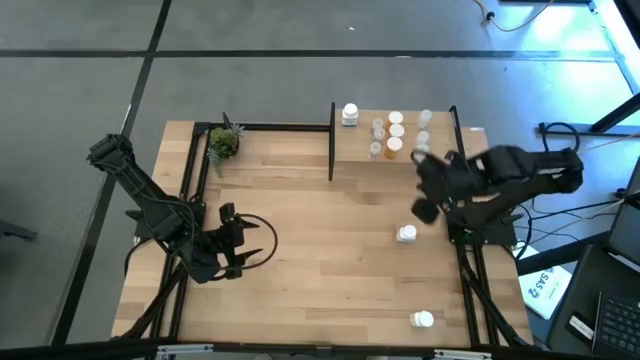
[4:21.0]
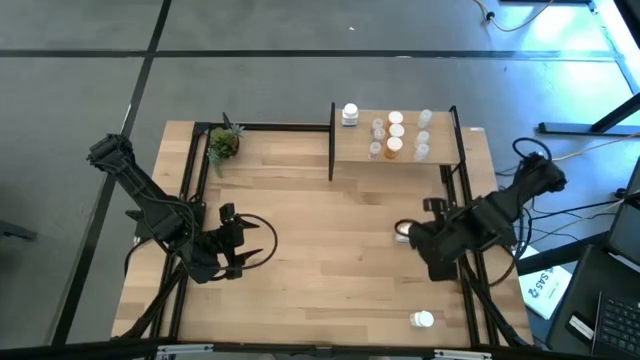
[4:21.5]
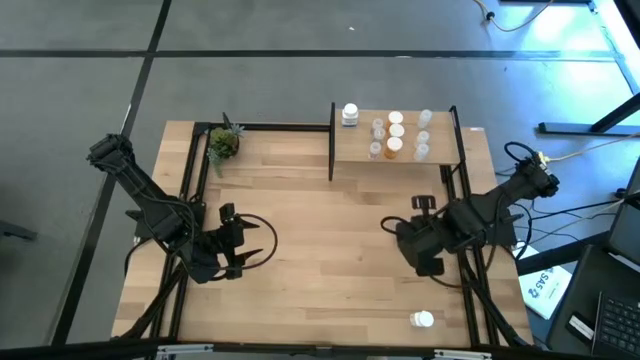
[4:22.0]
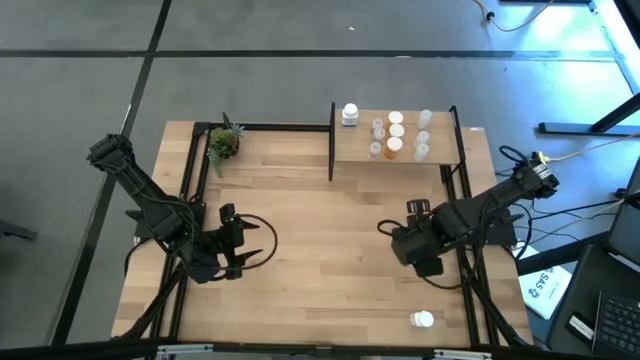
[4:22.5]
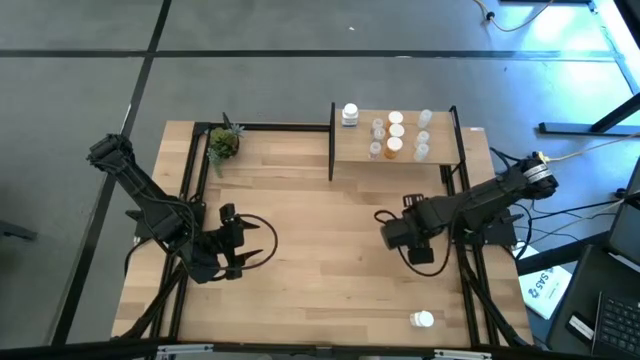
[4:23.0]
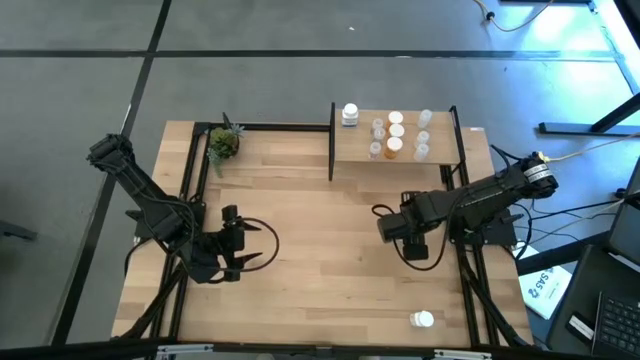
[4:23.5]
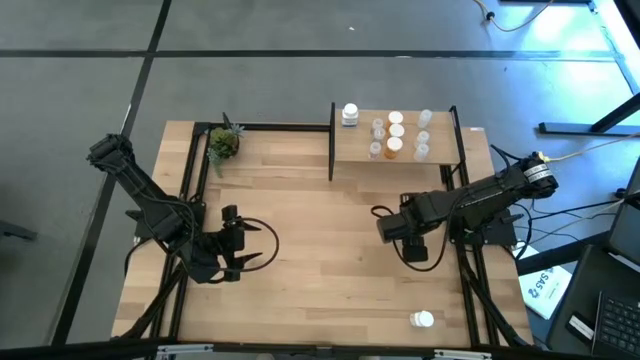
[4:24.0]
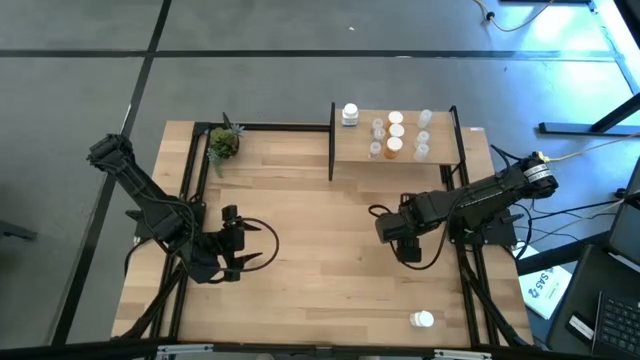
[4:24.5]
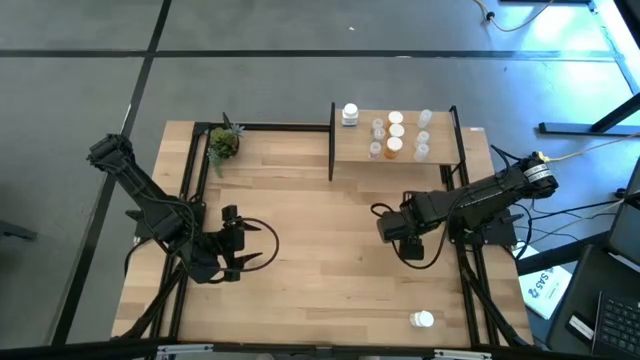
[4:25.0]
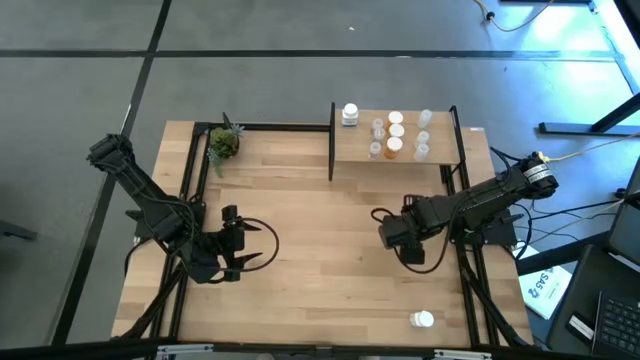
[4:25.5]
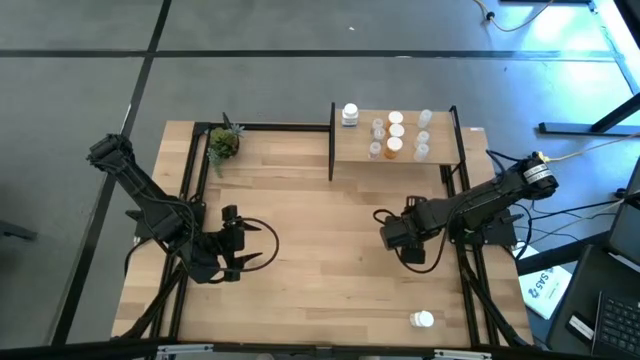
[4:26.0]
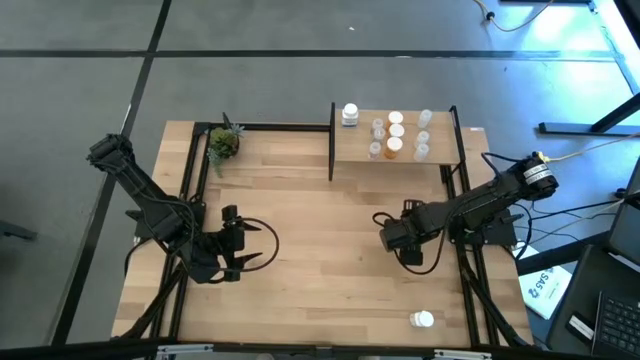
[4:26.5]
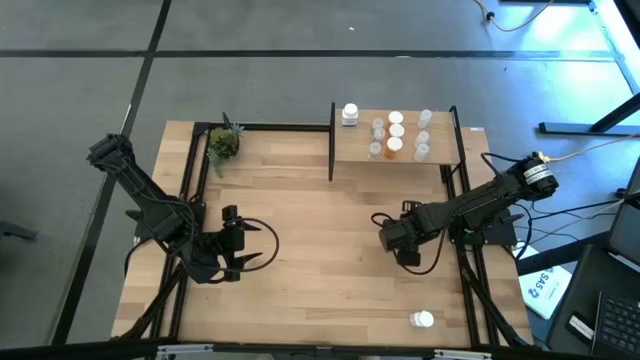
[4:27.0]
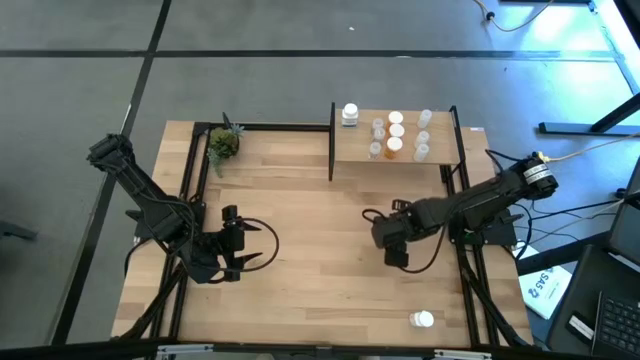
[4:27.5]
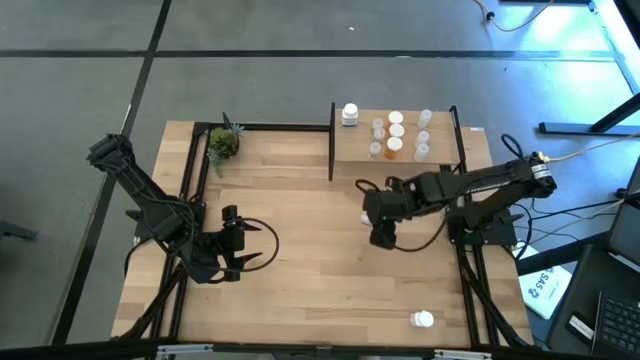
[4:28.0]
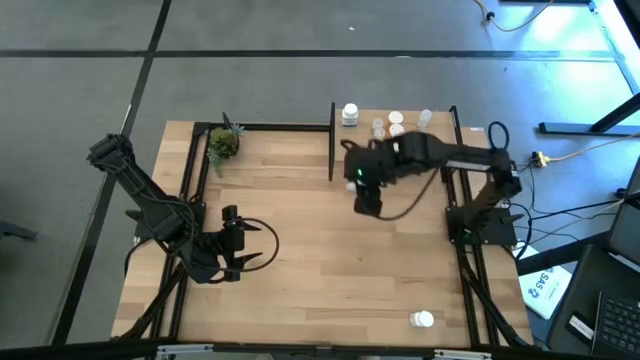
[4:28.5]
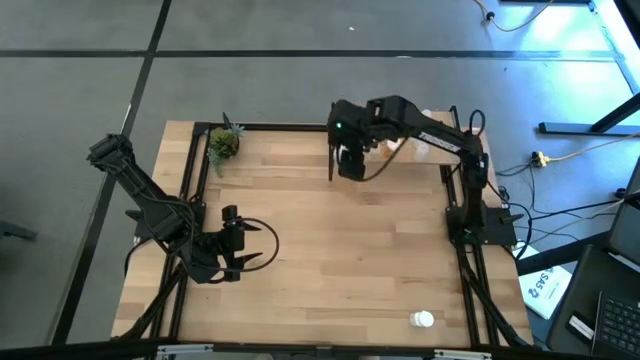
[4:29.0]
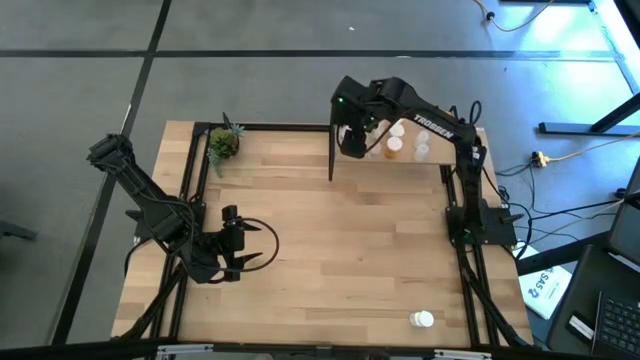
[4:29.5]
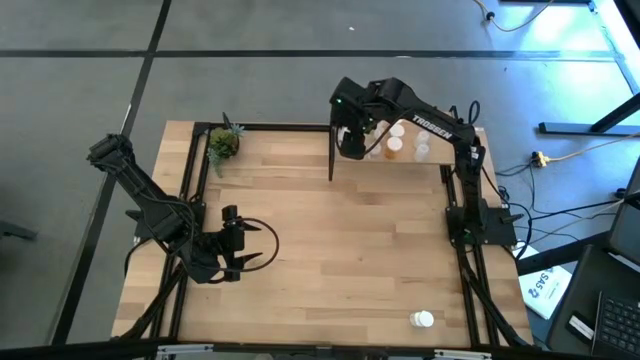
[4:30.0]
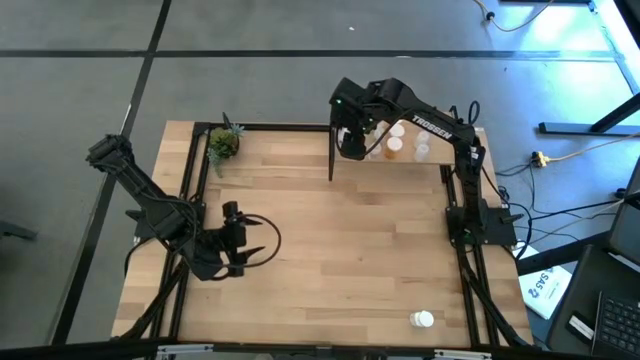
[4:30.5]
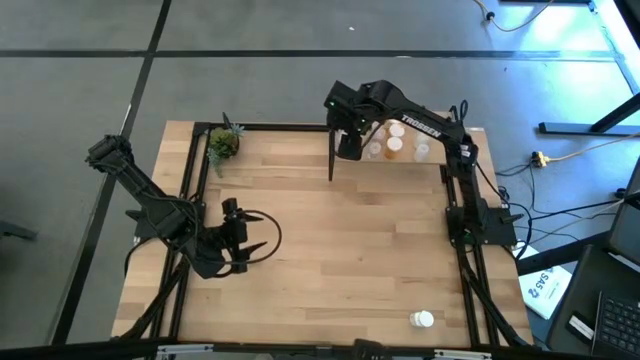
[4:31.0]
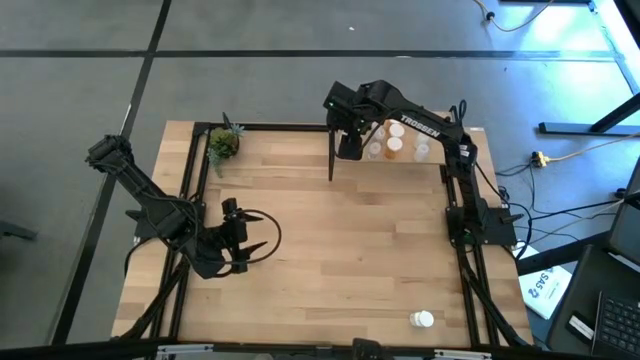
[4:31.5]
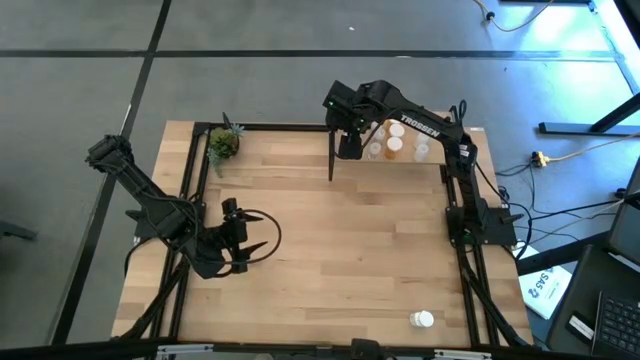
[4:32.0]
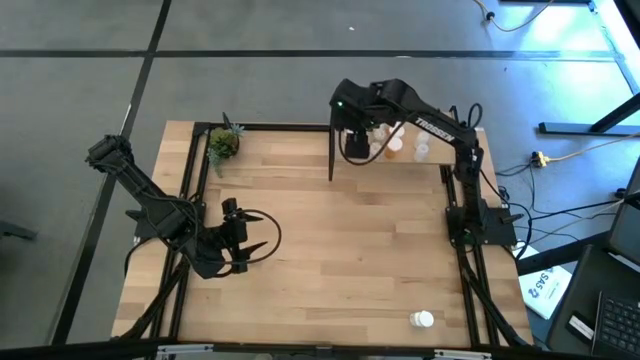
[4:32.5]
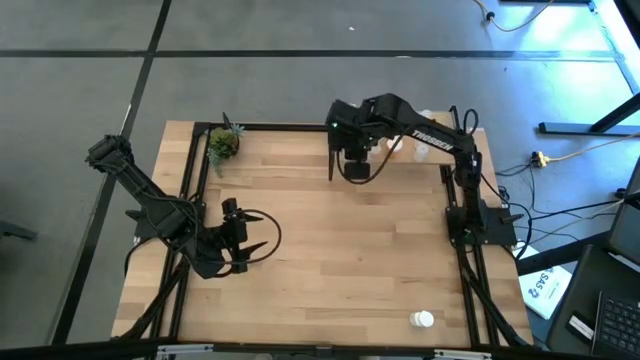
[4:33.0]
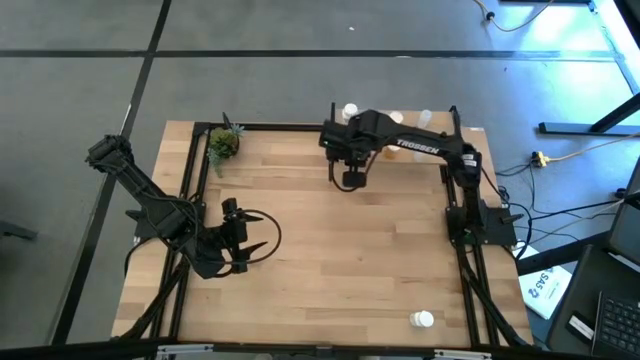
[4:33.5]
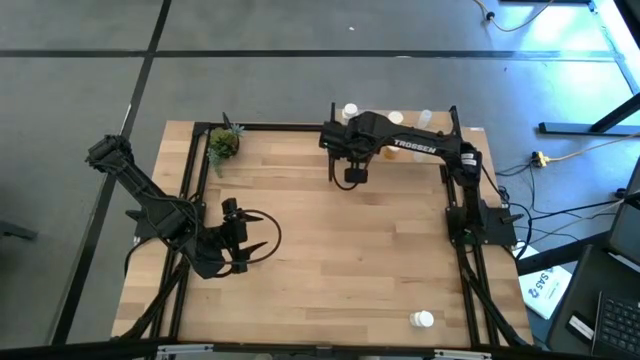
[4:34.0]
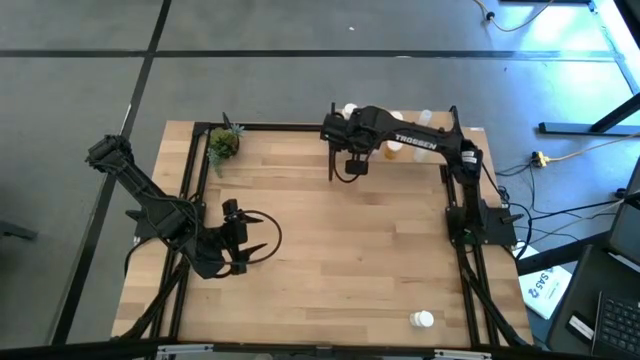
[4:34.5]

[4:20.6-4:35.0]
Task: Pick and place medicine bottles onto shelf by color
Put the top white pill bottle on the shelf aligned with the other white pill bottle

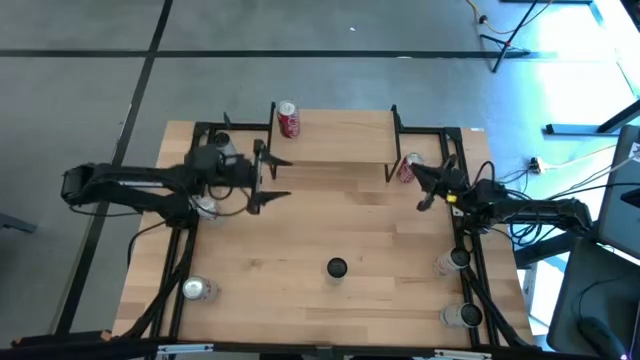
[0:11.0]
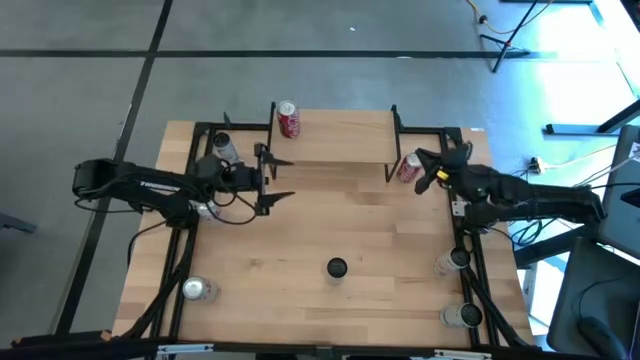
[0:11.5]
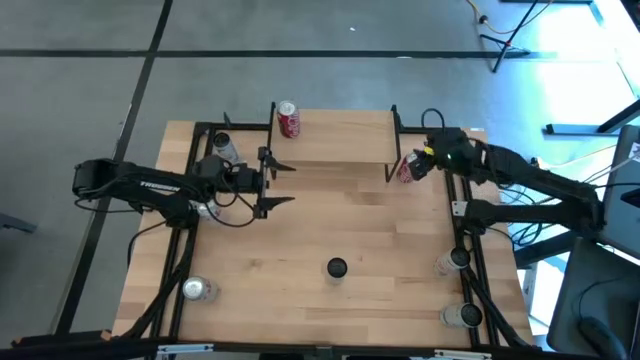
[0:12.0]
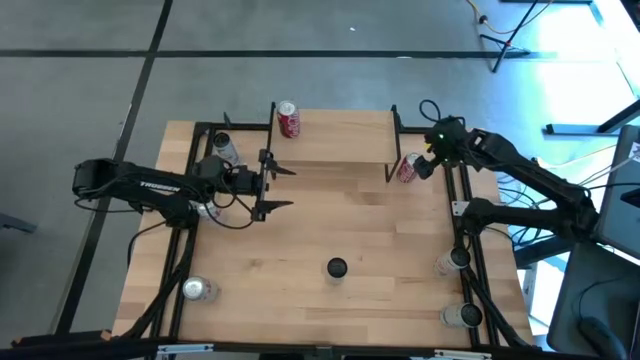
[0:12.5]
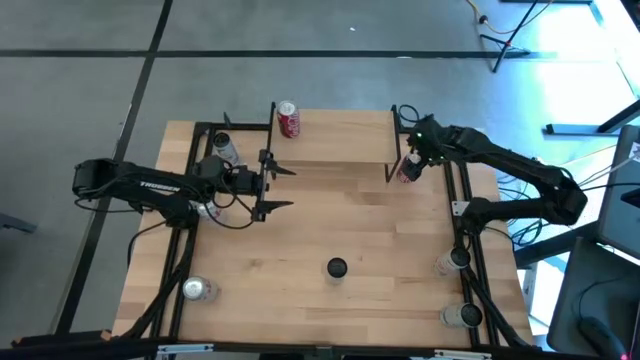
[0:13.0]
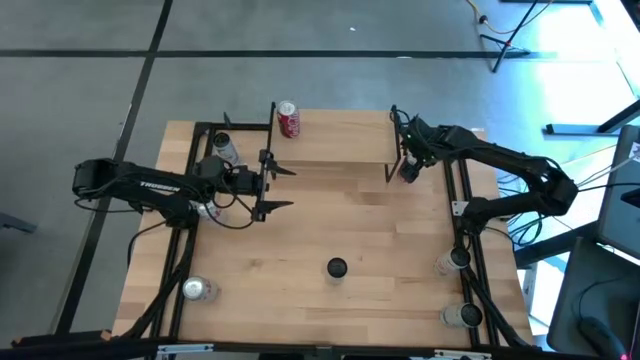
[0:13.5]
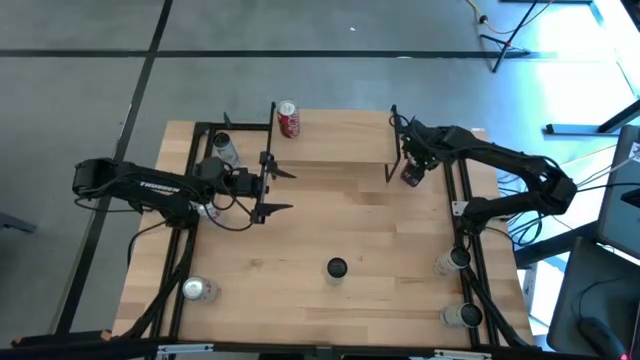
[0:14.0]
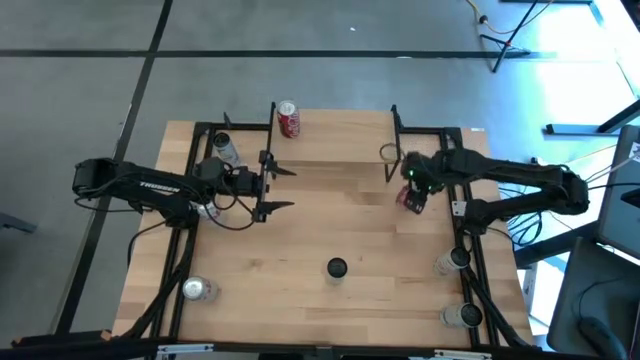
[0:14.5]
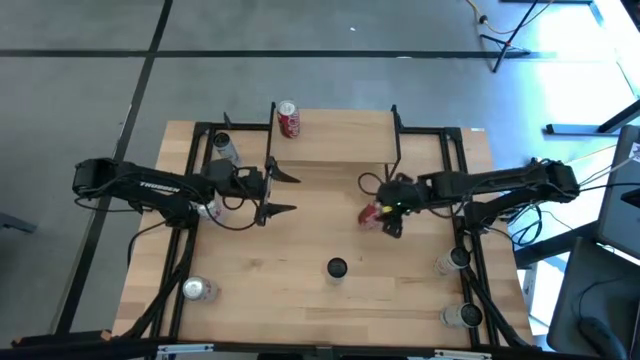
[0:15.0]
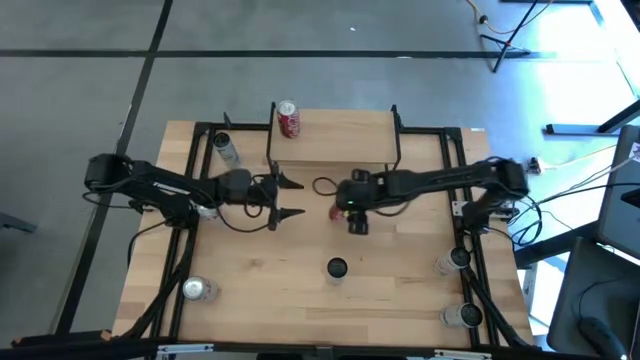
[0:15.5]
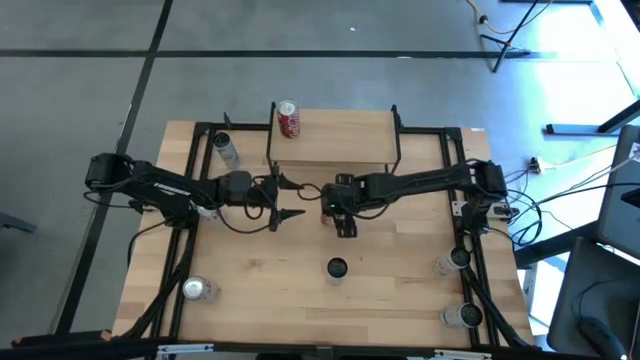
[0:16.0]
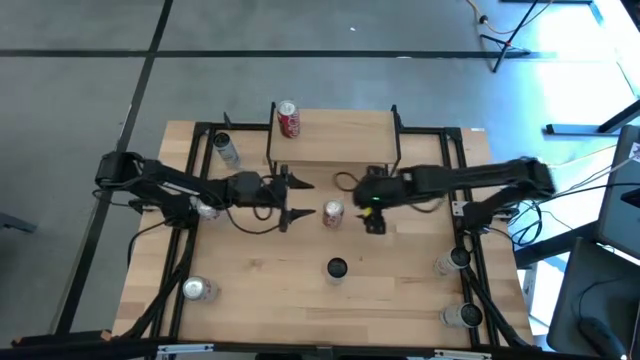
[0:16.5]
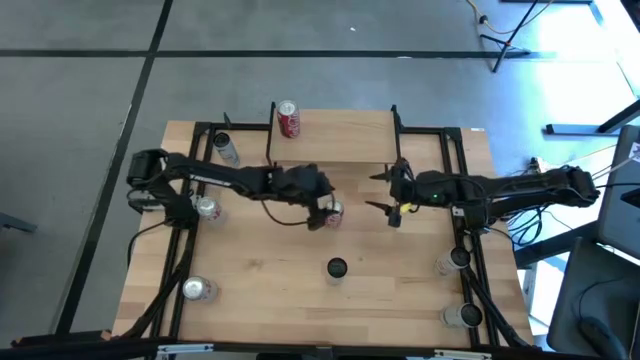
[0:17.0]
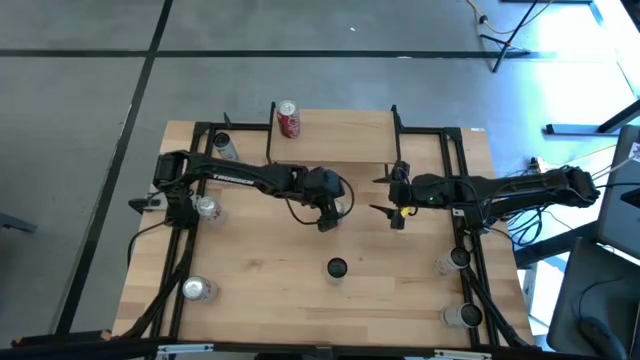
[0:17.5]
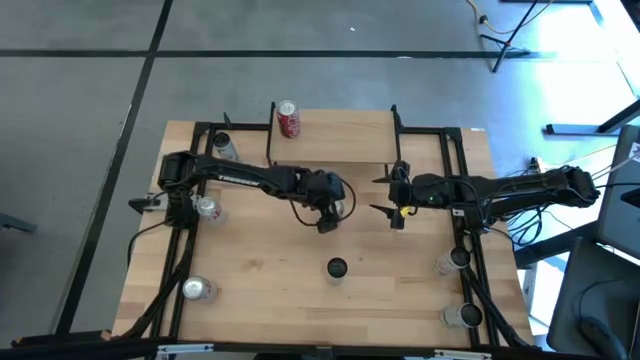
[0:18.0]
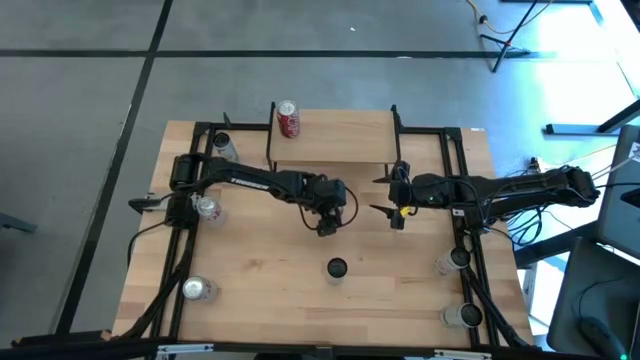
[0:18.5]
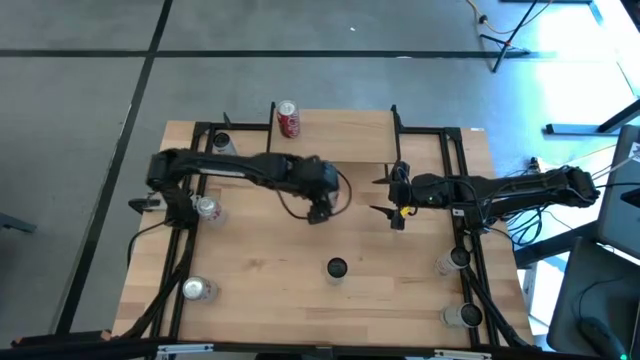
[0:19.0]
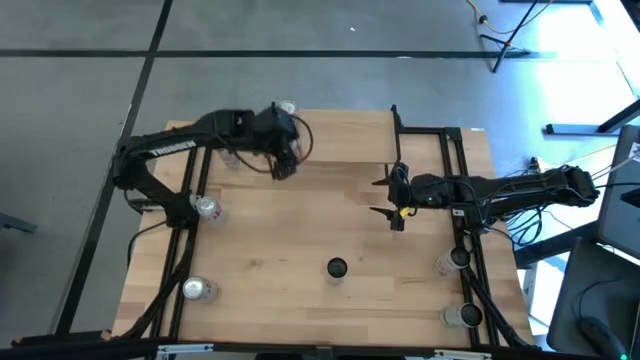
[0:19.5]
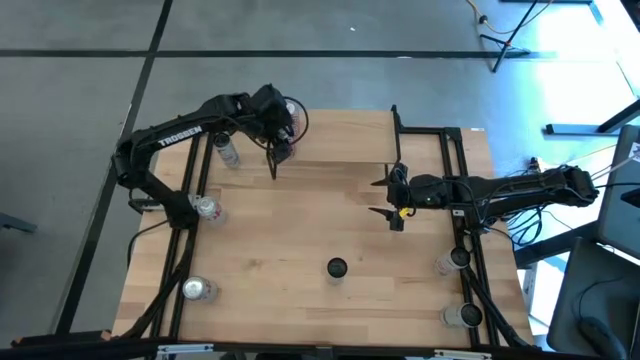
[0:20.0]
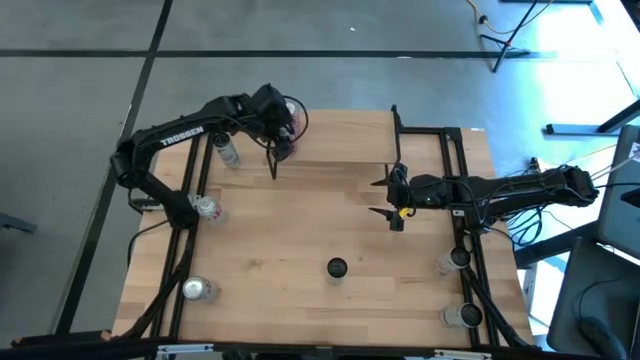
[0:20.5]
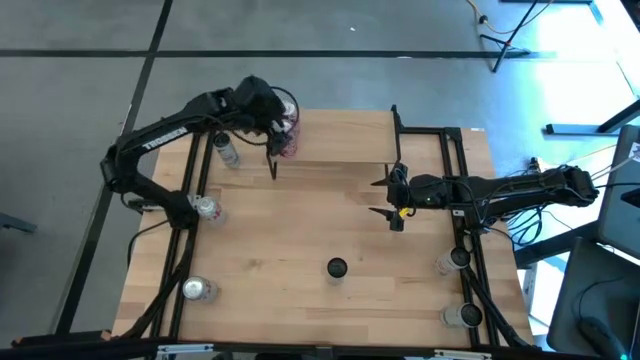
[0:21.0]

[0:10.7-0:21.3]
Task: Place canned beverage on shelf
Put the red-white soda can aligned with the other red-white soda can on the shelf
